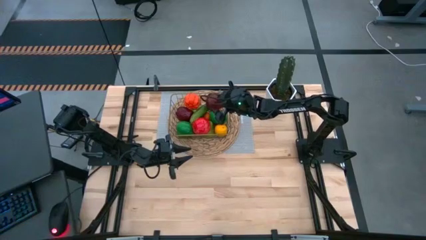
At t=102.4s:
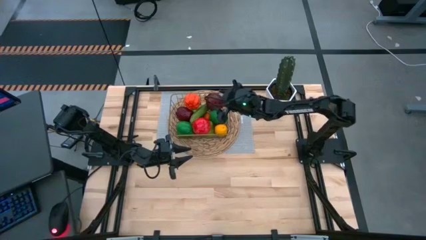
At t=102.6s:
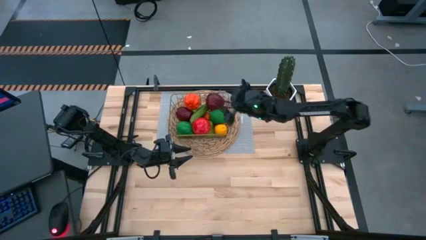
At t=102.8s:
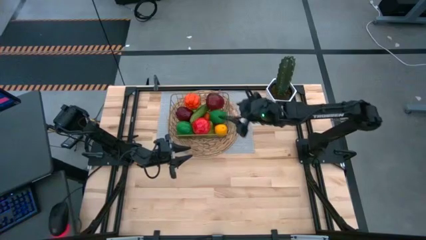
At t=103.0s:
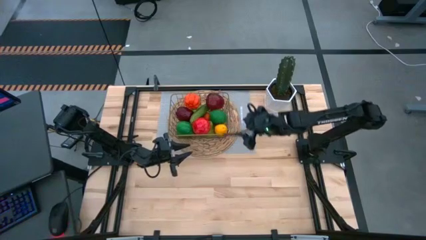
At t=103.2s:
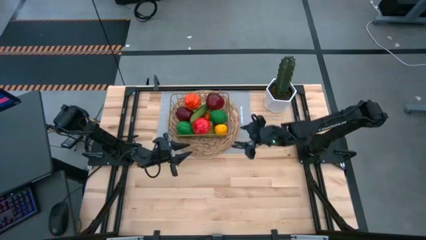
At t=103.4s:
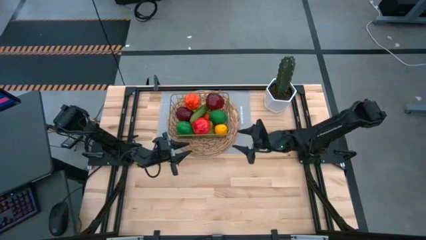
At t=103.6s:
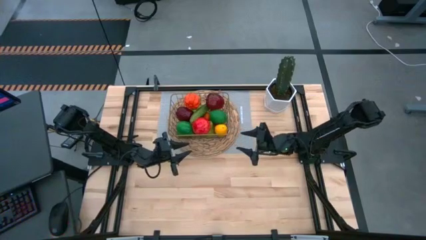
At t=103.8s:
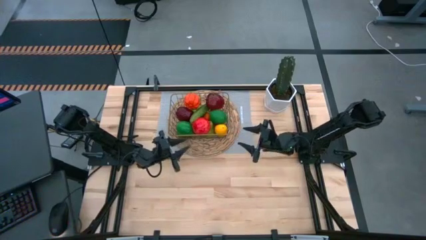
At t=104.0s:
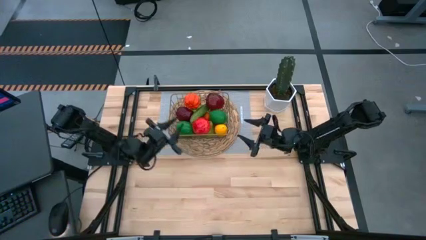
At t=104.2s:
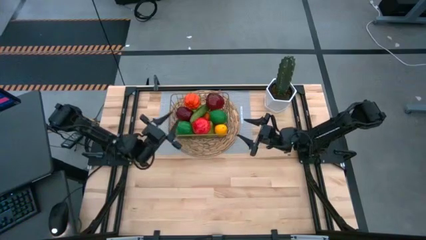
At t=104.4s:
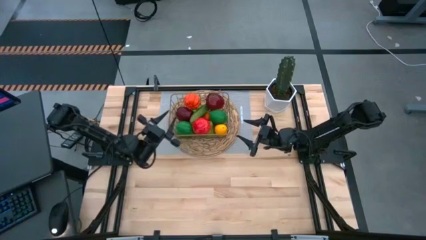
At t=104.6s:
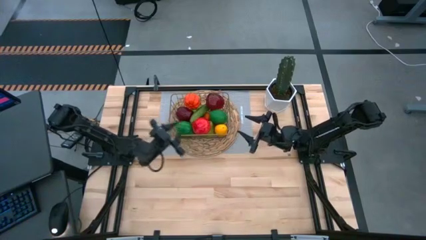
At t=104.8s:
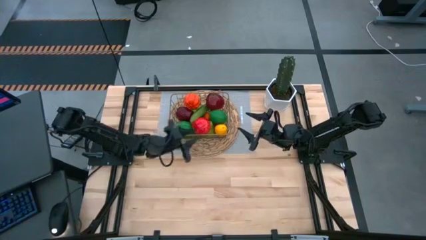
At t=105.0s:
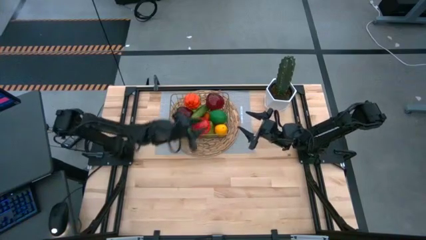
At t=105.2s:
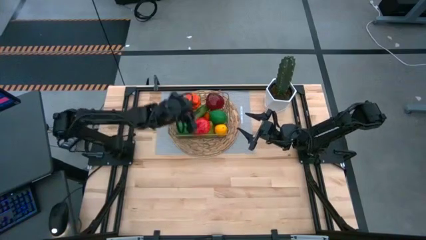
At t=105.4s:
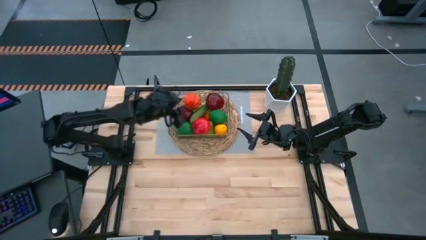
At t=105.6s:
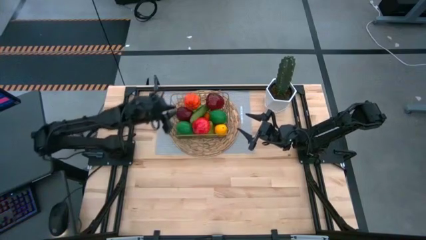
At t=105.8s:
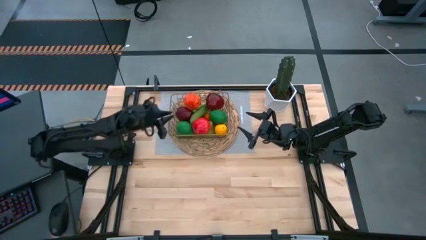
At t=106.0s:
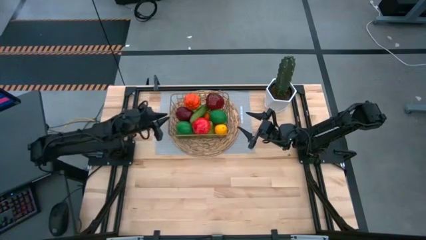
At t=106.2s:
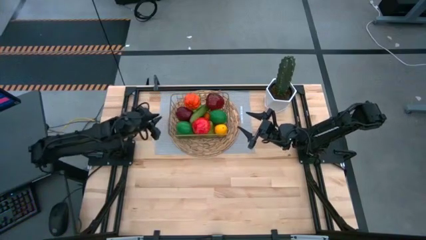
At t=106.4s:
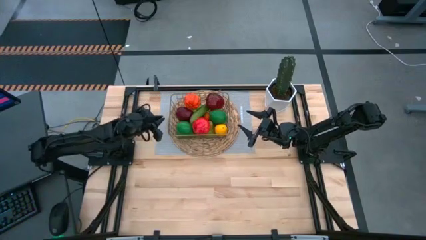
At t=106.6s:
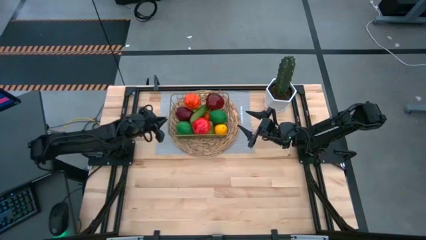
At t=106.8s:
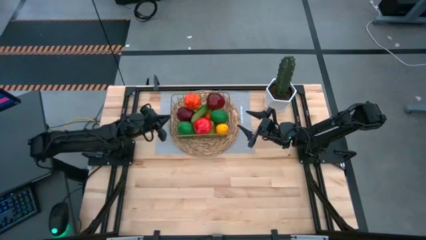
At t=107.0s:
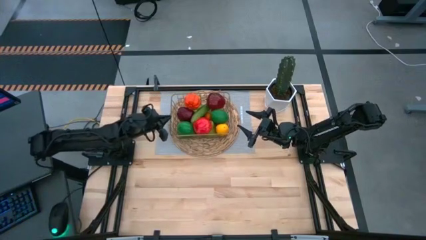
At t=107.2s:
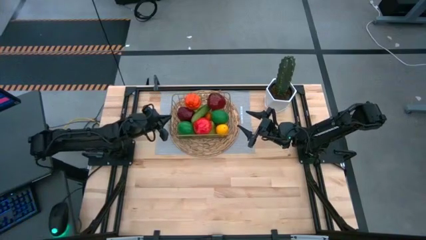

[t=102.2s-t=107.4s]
Task: Build produce basket
Adjust the gold wire basket

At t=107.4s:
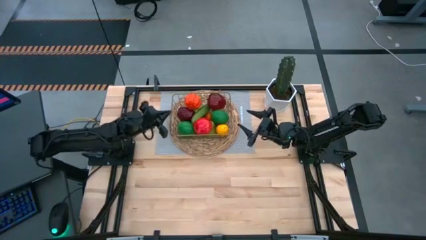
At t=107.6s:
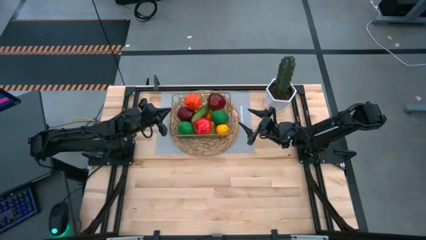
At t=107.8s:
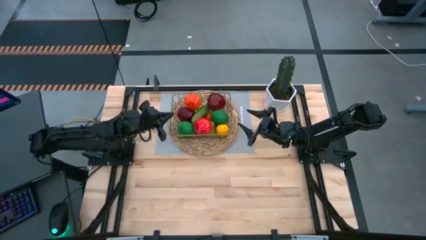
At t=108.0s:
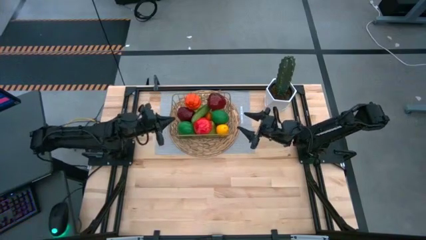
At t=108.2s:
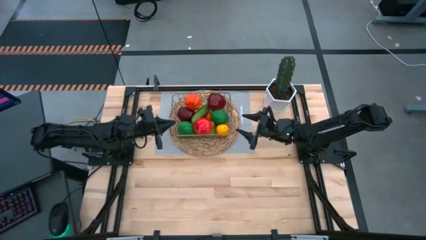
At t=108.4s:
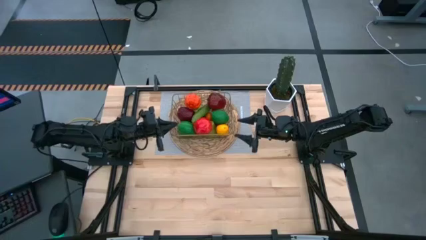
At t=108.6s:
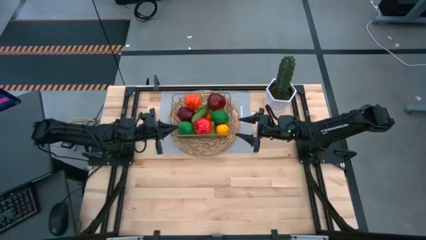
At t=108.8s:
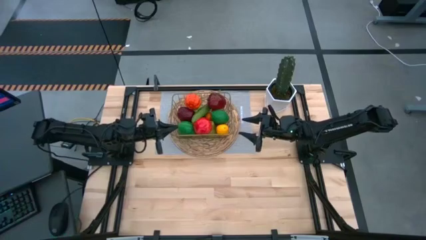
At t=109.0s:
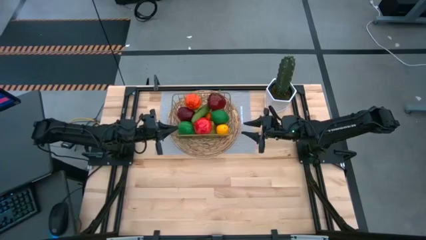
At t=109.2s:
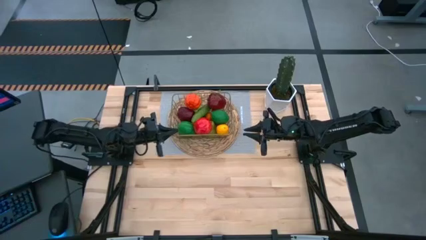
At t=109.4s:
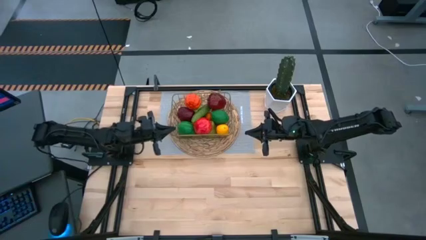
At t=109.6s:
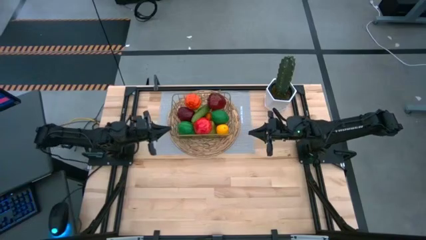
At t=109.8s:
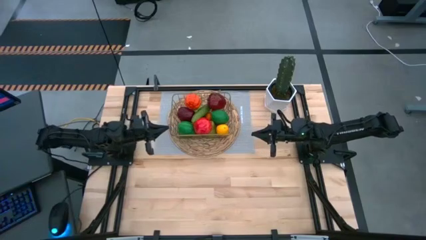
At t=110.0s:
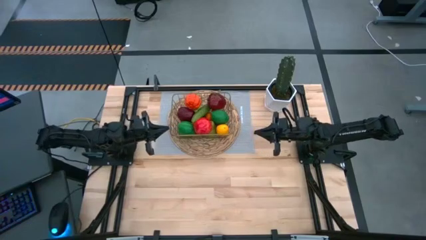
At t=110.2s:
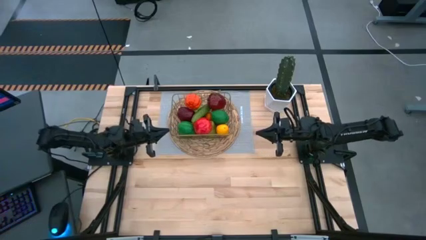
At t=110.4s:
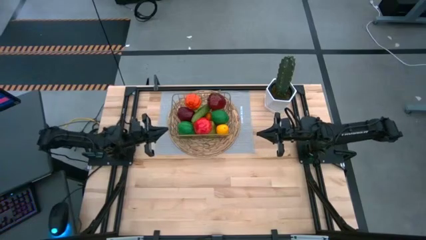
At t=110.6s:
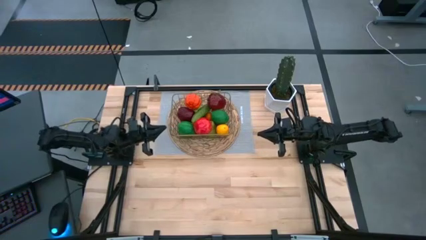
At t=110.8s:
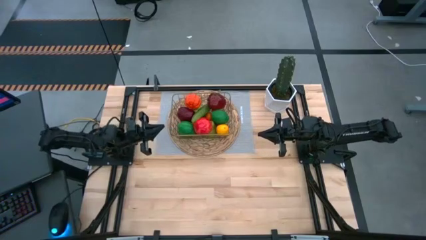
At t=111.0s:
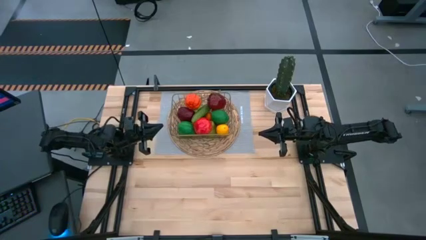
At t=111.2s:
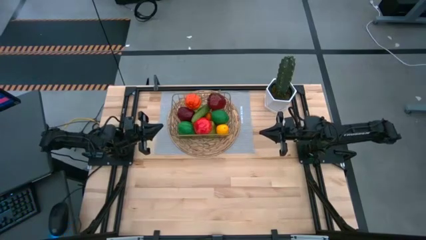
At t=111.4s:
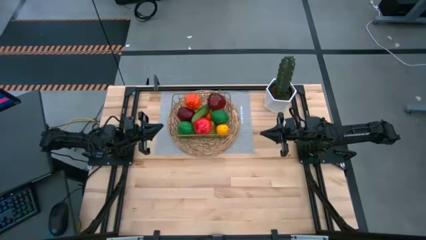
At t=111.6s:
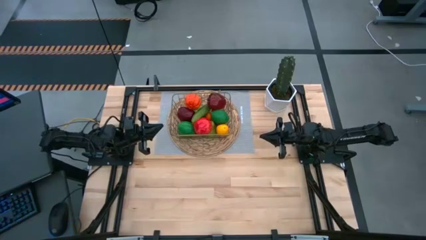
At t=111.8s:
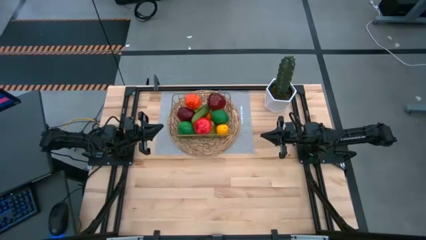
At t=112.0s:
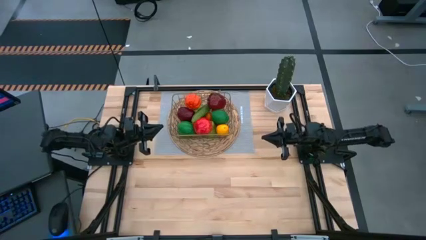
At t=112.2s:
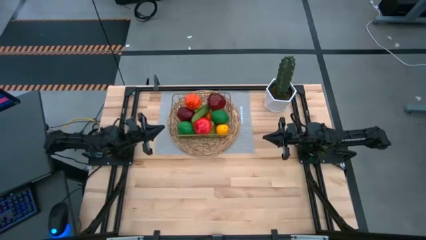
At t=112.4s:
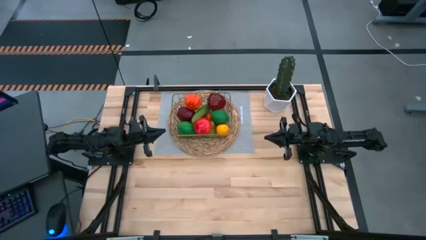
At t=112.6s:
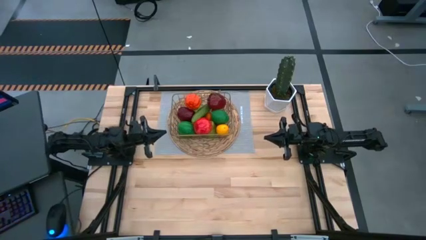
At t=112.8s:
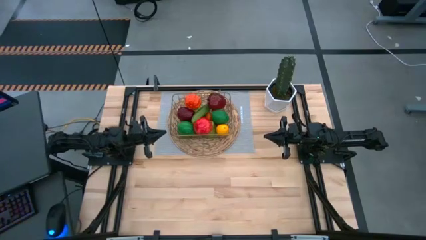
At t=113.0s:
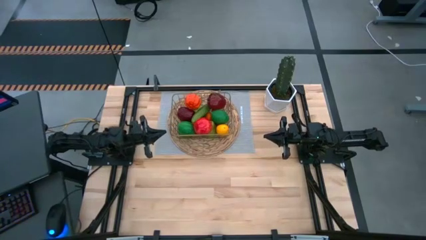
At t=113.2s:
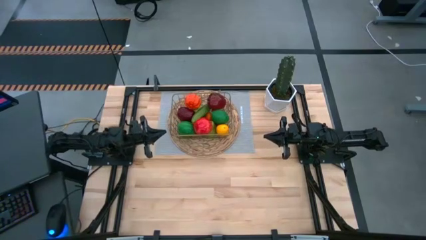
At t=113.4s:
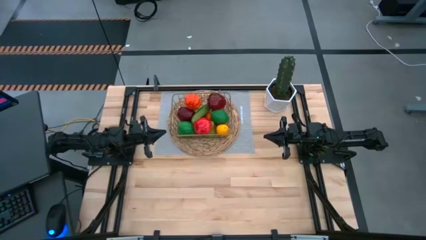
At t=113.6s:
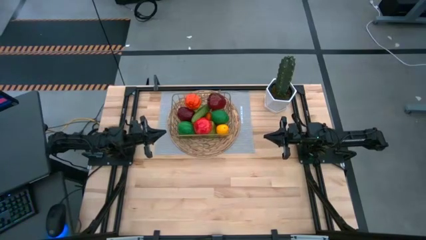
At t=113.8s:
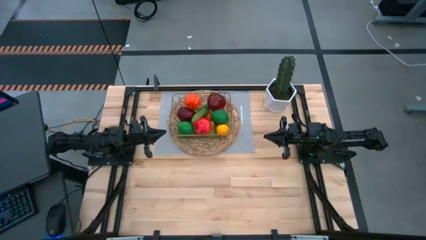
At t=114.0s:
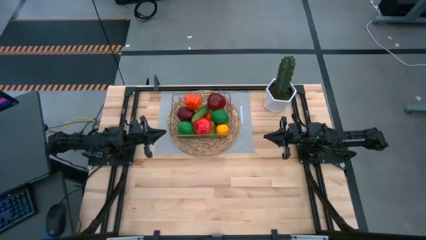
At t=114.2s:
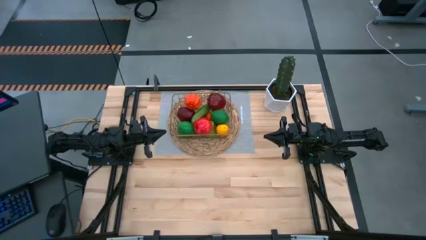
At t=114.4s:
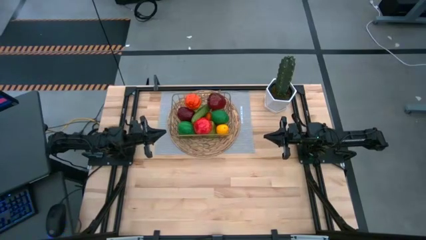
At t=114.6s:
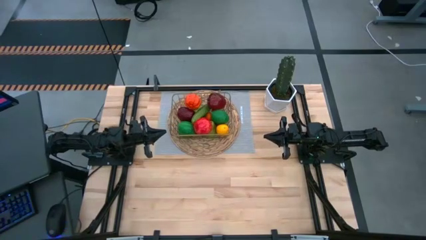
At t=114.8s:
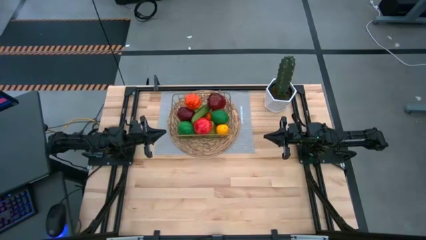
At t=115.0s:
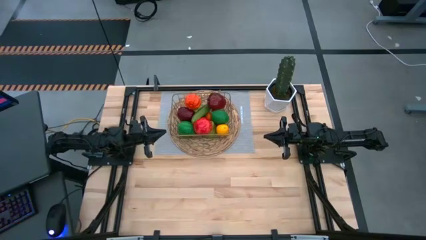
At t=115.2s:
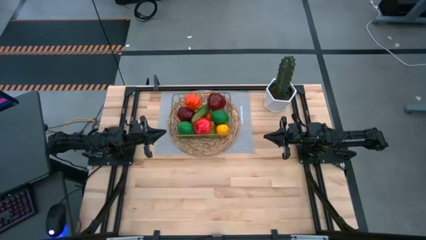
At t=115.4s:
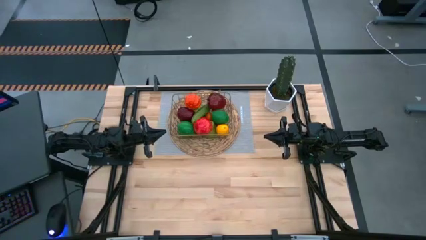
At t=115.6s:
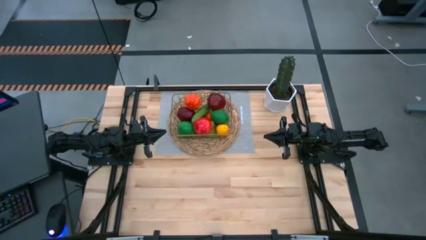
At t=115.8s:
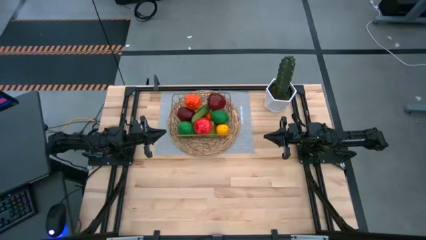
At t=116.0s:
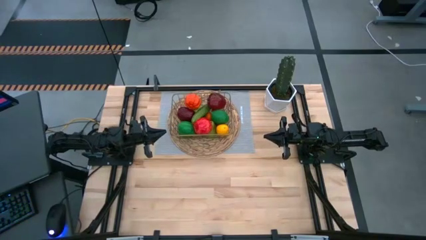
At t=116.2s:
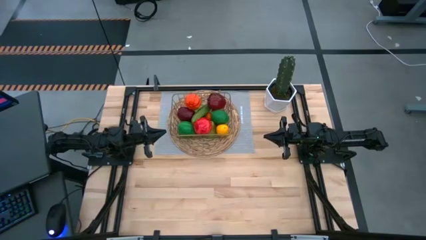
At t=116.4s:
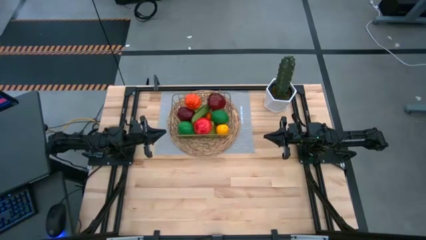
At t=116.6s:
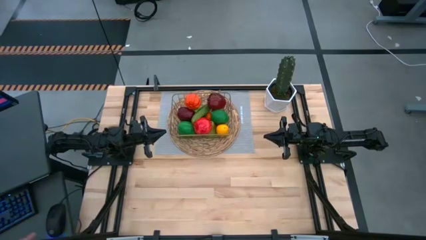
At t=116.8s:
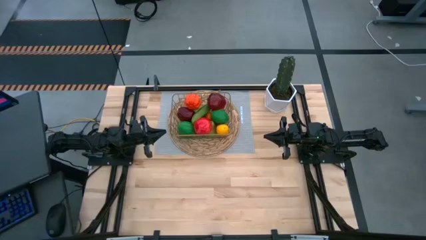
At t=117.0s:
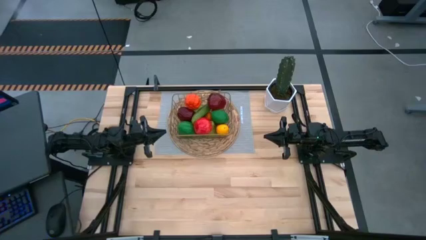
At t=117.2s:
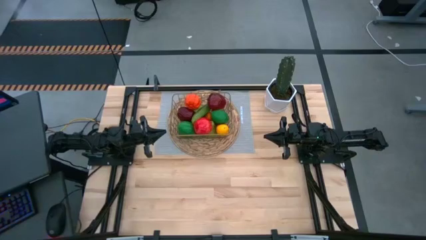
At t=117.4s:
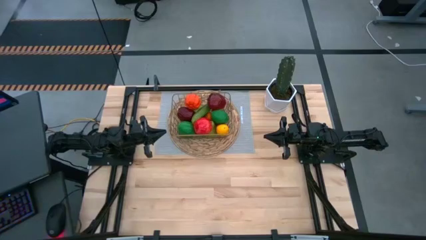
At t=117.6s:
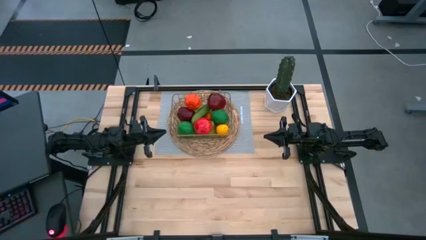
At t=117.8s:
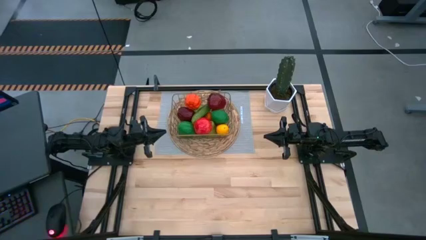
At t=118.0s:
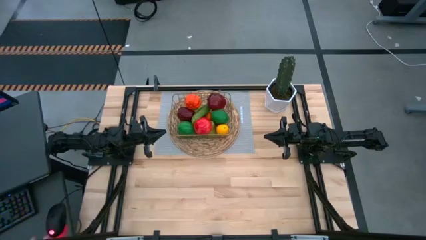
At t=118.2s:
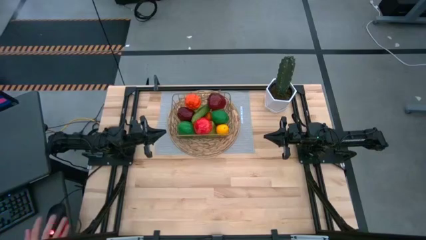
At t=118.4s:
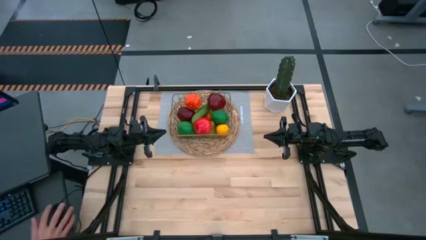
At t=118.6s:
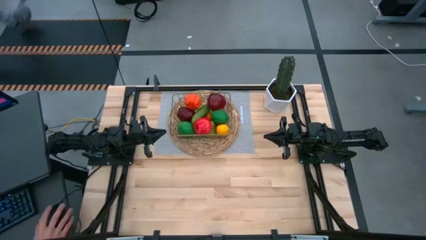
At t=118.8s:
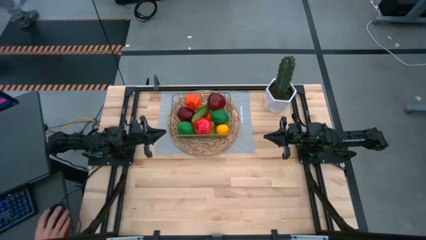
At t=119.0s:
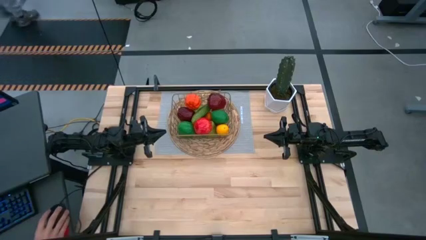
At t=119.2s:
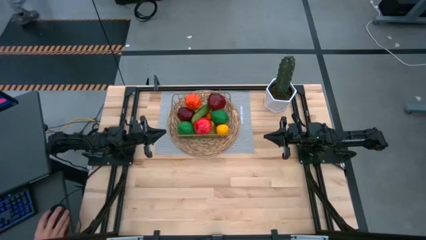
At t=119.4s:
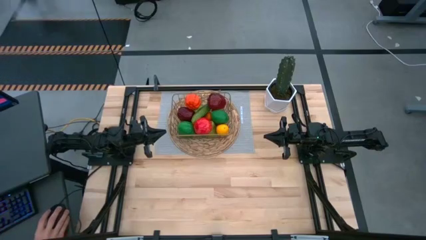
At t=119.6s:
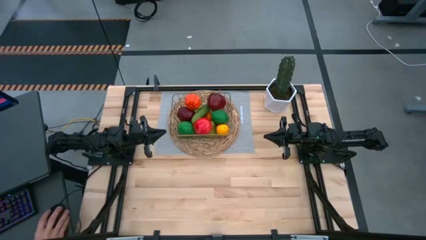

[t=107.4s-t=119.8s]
Return to Home Position
